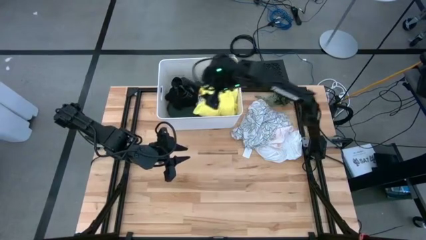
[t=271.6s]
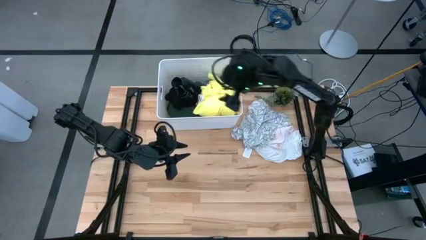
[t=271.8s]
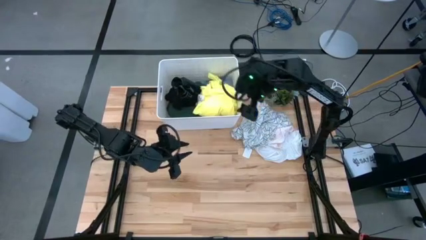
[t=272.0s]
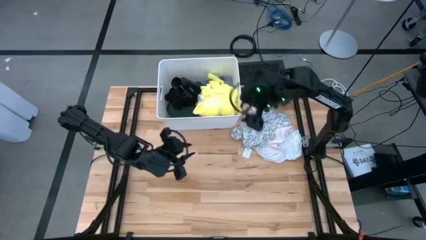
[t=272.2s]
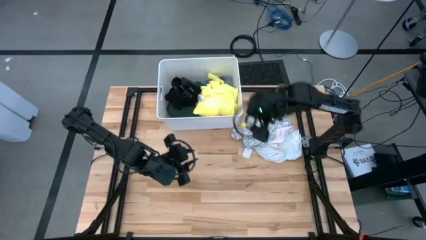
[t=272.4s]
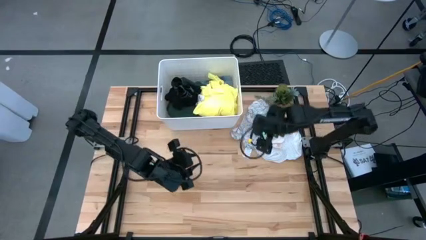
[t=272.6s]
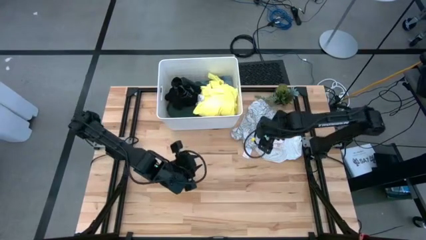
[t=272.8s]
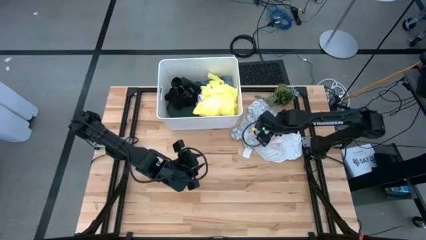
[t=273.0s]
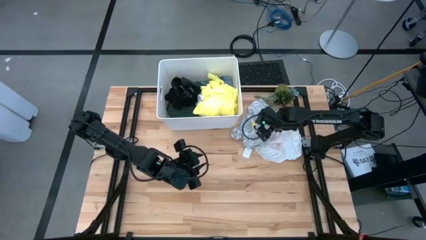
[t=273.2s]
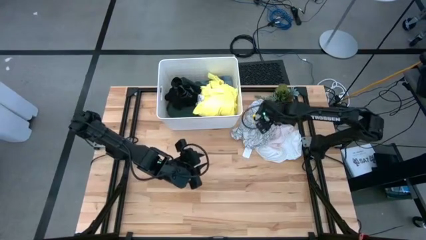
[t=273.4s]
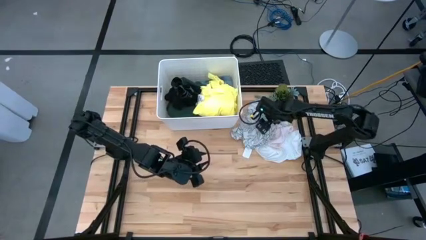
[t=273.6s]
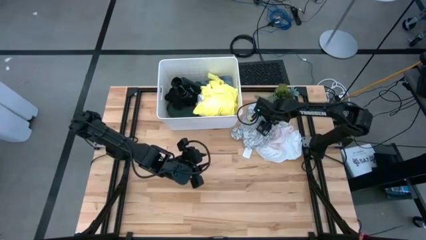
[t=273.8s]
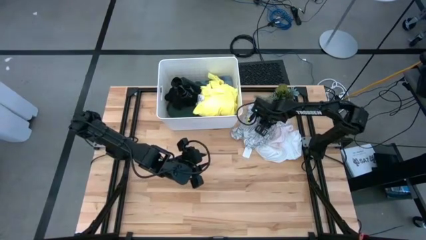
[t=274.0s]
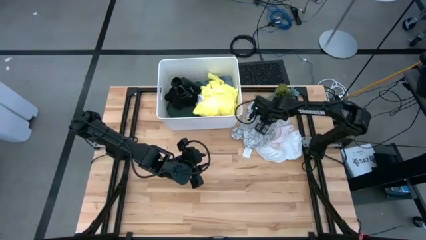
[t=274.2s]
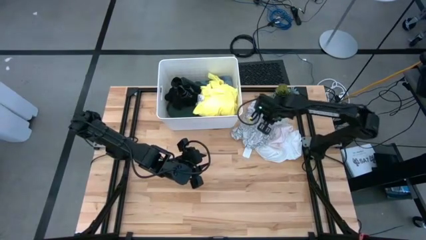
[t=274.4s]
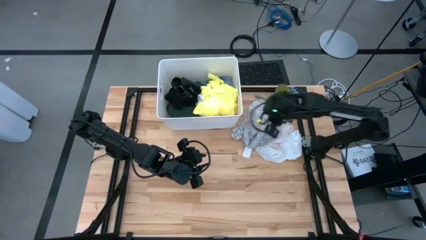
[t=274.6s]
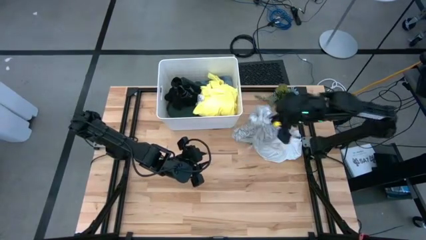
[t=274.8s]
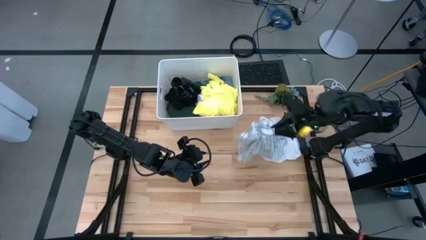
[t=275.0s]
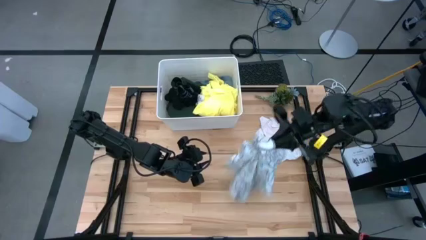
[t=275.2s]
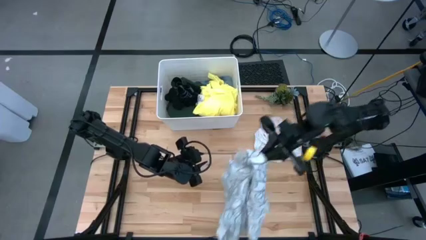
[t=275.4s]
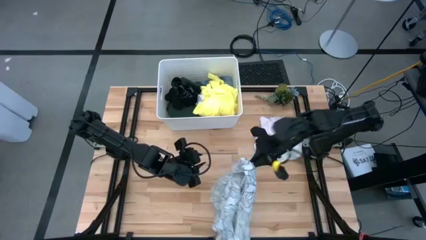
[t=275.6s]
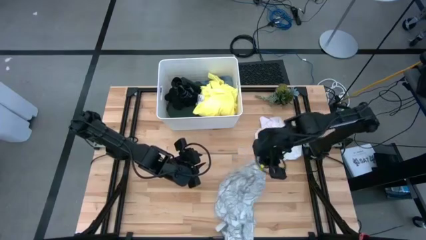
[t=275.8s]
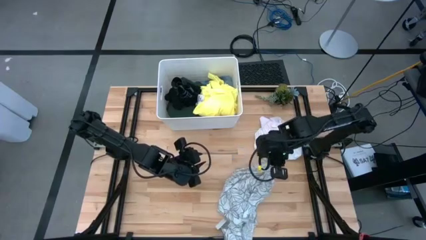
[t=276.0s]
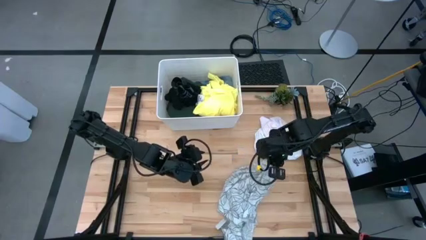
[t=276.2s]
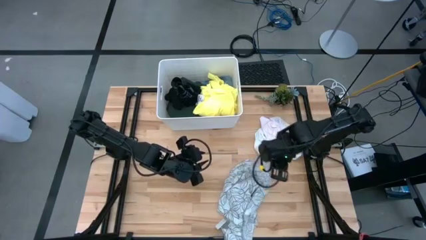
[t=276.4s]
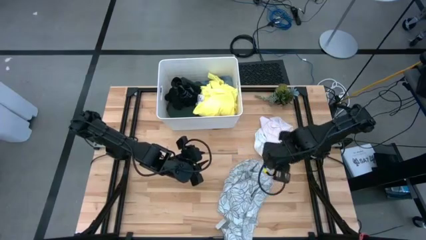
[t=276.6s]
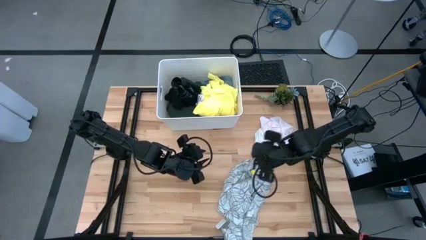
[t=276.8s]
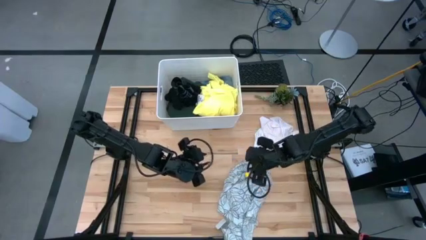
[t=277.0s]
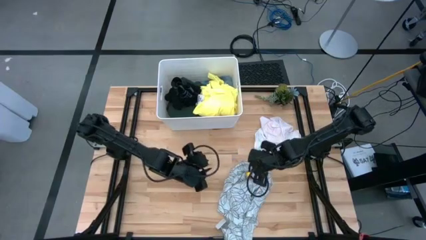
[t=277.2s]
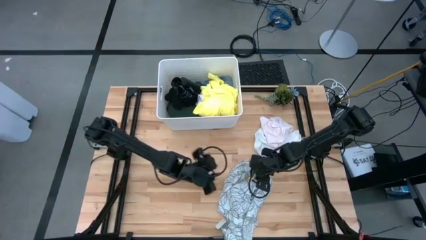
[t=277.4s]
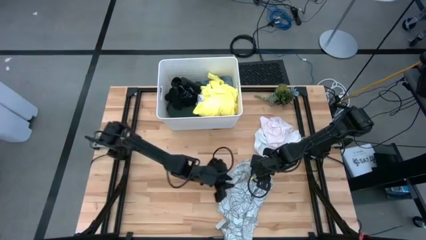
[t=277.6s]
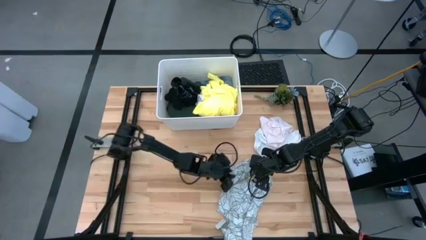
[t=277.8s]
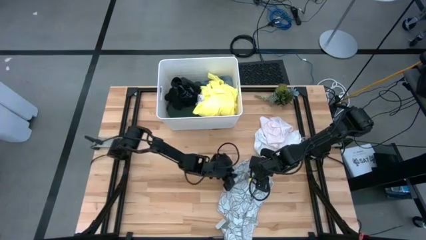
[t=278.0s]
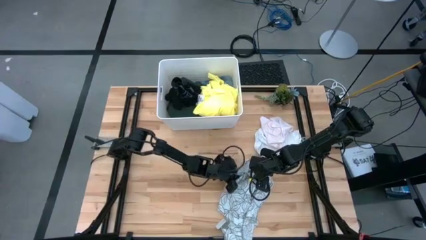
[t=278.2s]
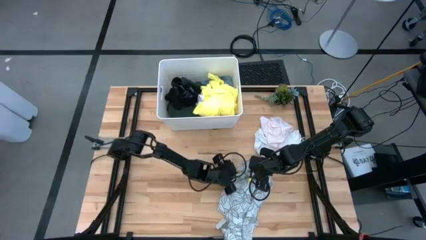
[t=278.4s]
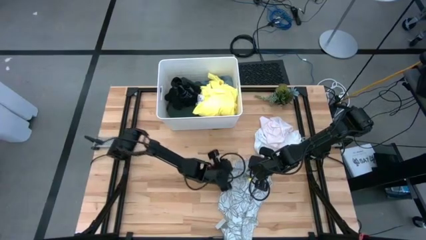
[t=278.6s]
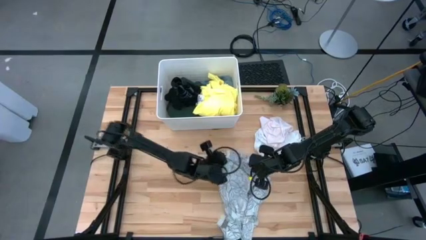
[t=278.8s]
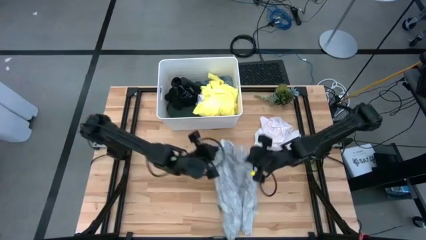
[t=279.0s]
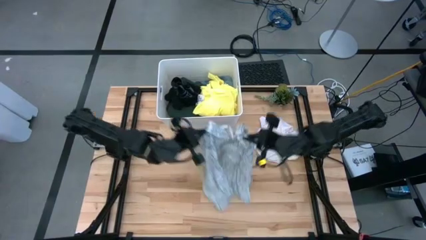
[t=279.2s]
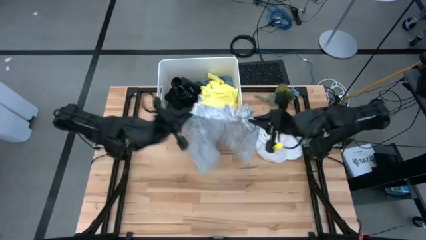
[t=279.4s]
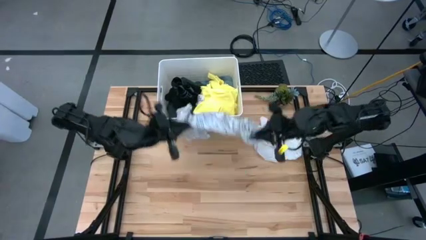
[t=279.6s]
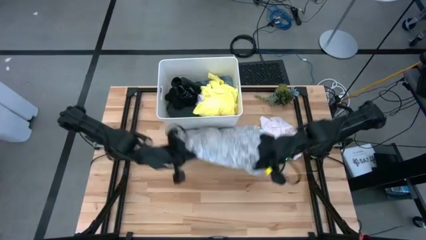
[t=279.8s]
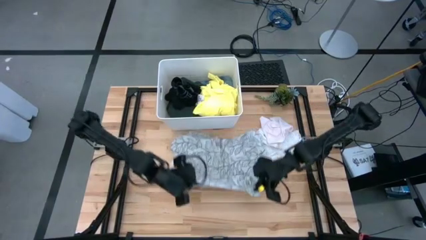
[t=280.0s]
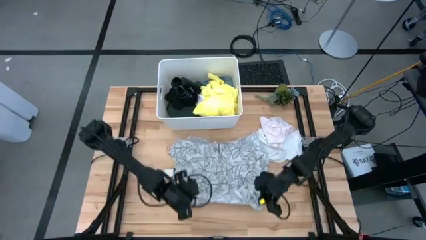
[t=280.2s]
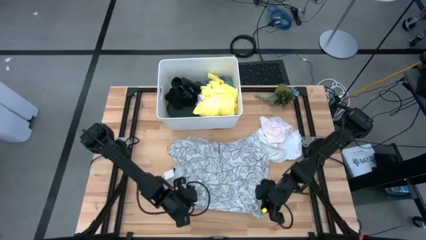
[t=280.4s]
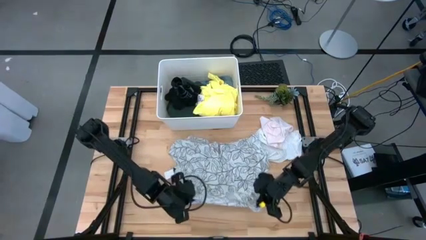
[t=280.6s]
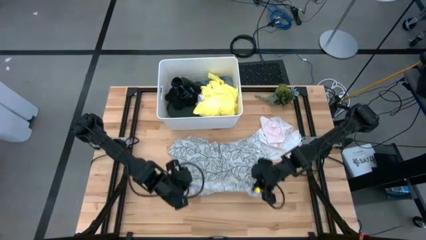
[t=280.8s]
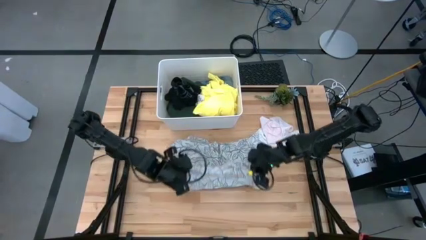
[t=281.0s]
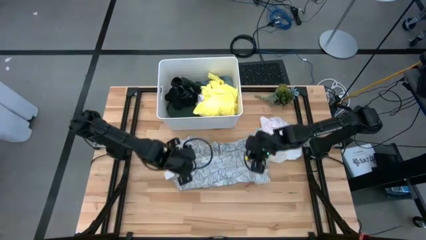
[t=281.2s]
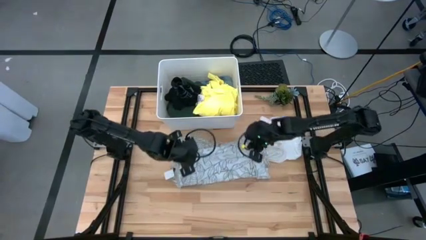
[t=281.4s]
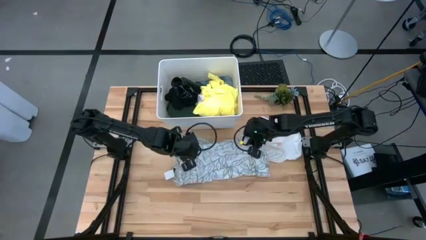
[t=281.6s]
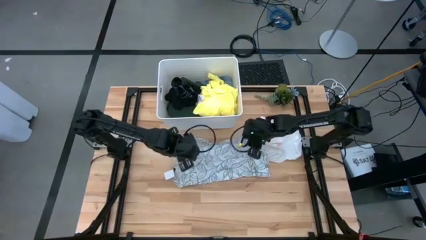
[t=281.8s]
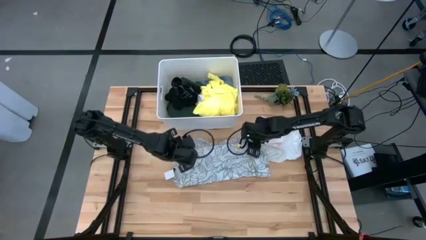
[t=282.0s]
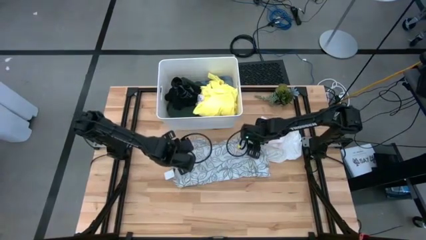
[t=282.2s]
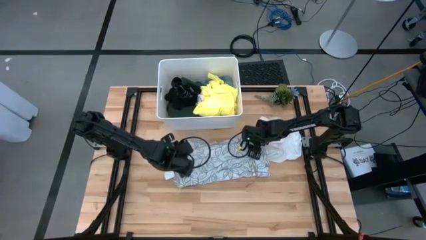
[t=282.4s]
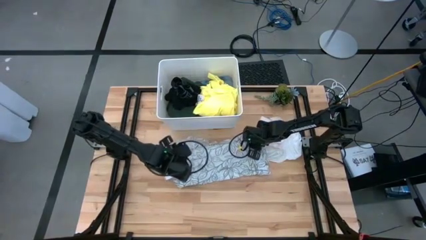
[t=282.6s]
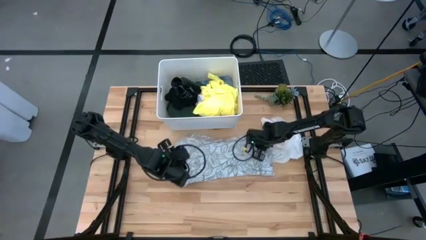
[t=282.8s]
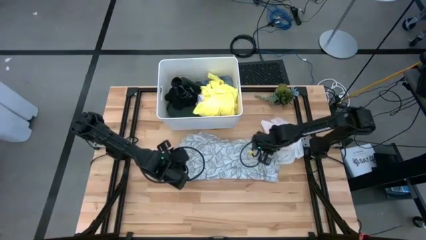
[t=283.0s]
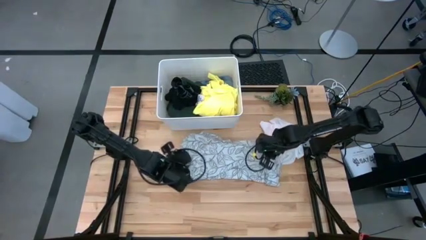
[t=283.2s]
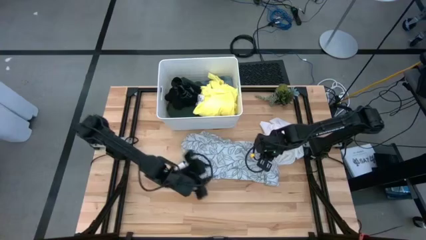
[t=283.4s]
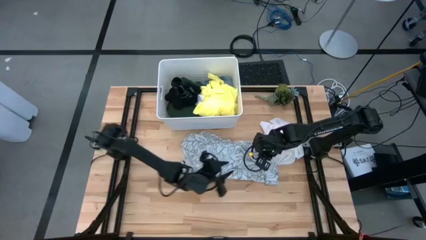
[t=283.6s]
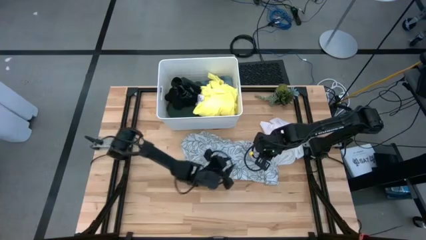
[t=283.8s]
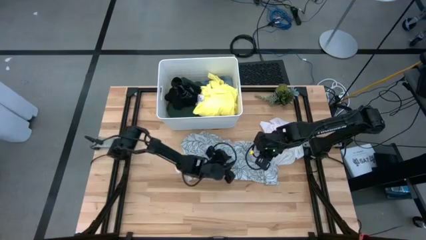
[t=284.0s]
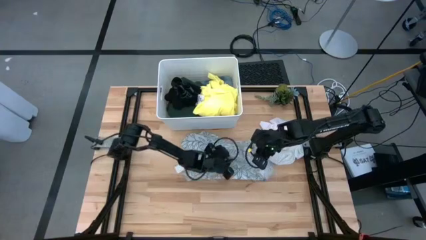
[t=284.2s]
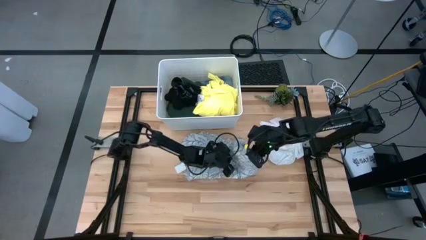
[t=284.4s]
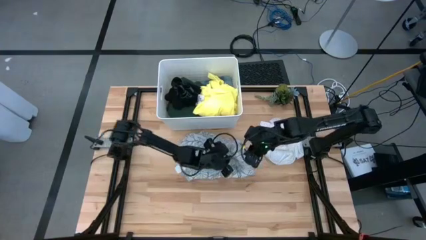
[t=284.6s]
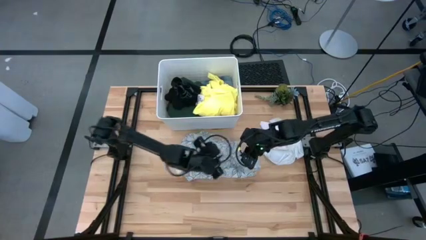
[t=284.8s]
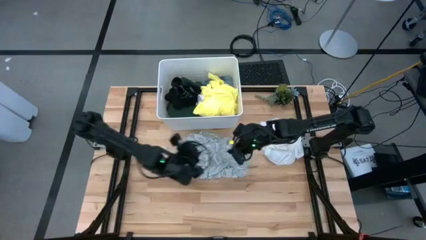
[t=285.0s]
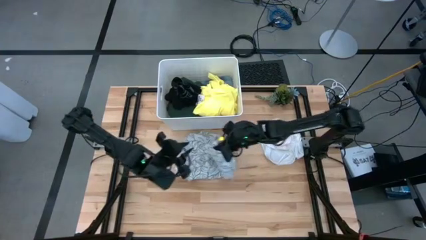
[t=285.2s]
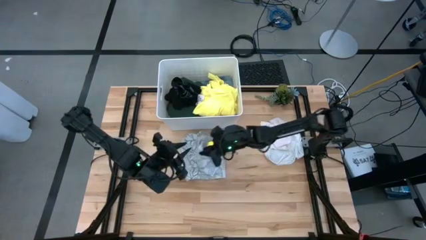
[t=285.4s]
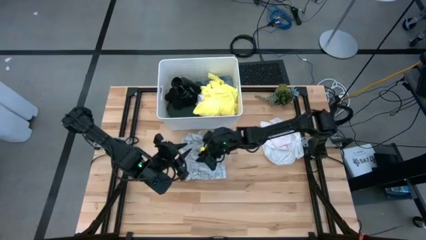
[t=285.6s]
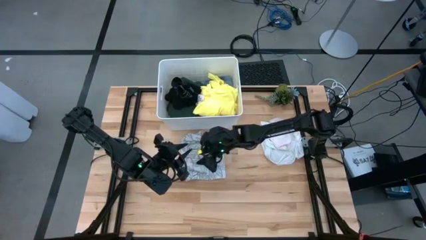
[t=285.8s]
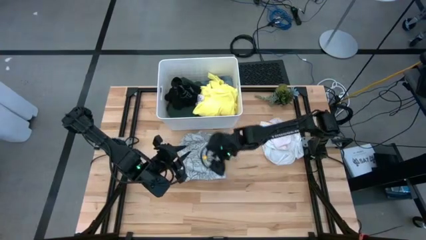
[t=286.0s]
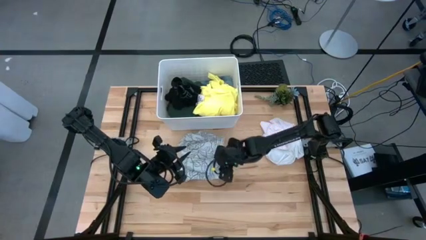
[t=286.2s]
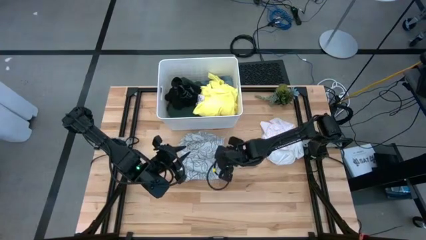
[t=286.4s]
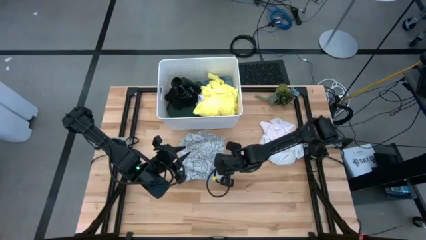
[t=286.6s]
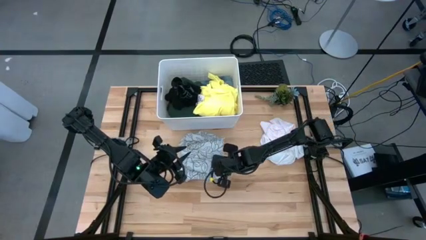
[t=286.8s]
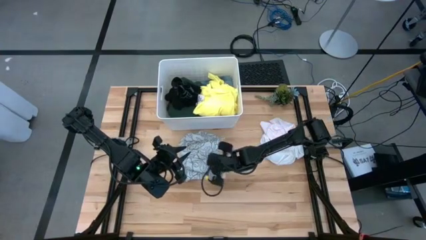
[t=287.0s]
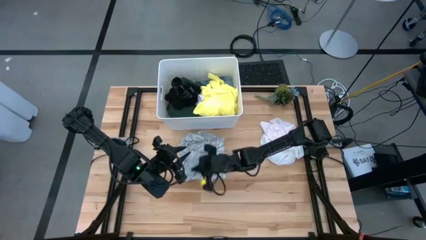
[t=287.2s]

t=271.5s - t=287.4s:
Task: Fold laundry
Fold the white patterned shirt
